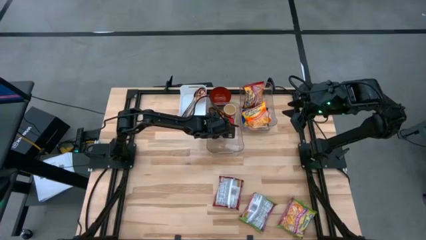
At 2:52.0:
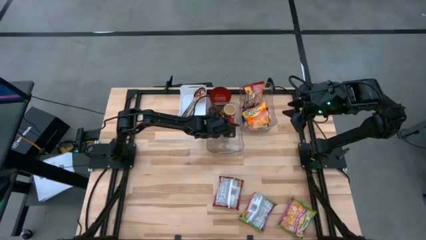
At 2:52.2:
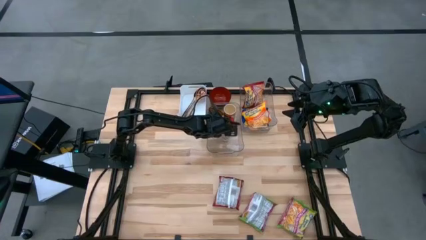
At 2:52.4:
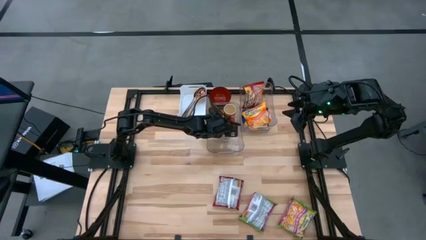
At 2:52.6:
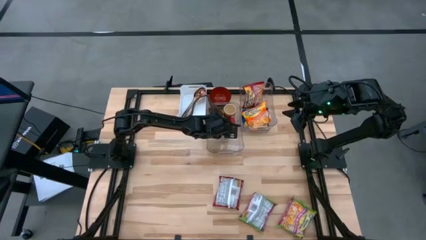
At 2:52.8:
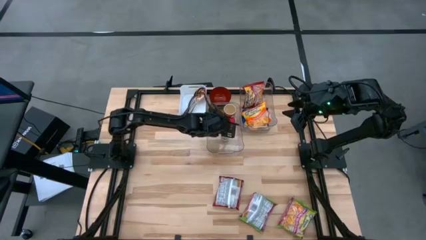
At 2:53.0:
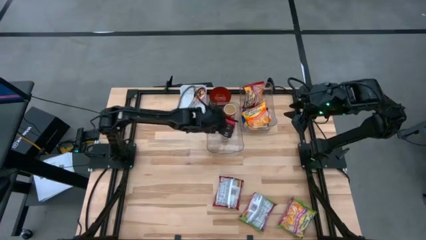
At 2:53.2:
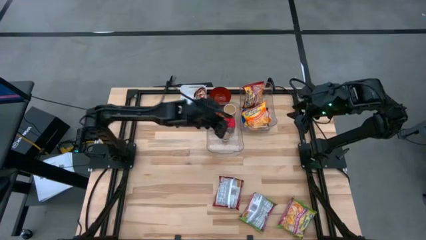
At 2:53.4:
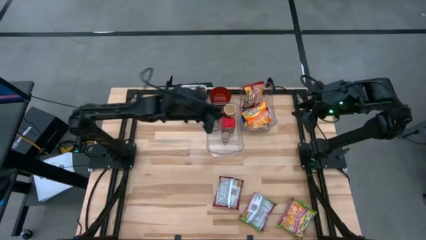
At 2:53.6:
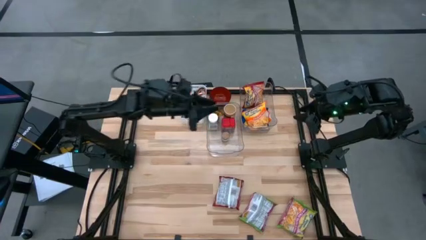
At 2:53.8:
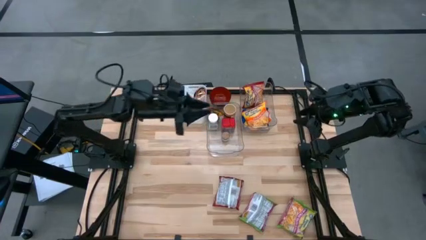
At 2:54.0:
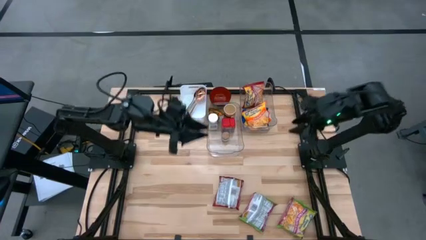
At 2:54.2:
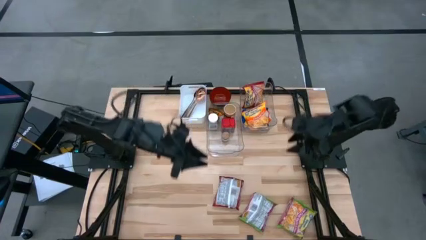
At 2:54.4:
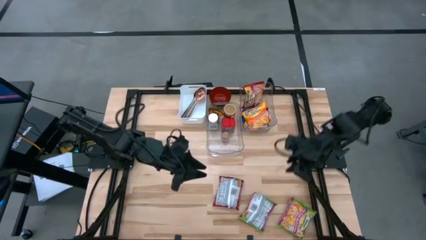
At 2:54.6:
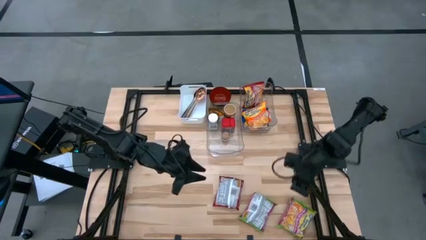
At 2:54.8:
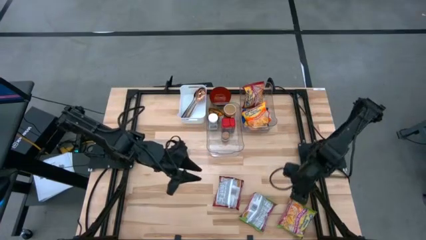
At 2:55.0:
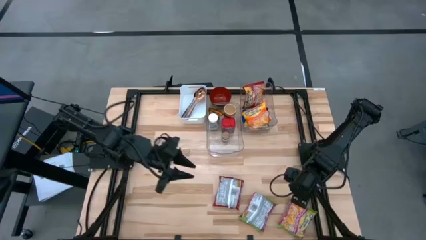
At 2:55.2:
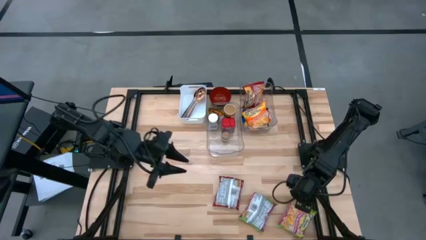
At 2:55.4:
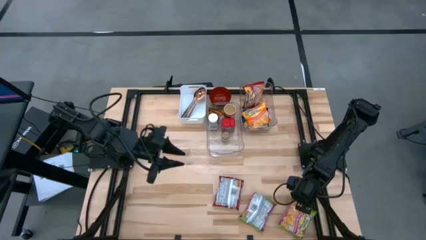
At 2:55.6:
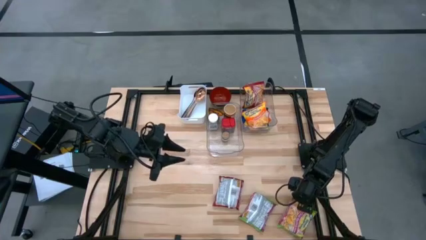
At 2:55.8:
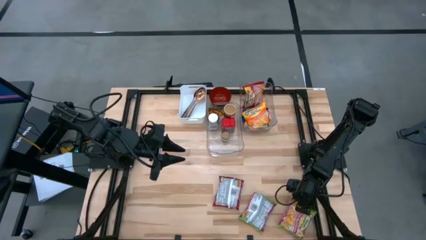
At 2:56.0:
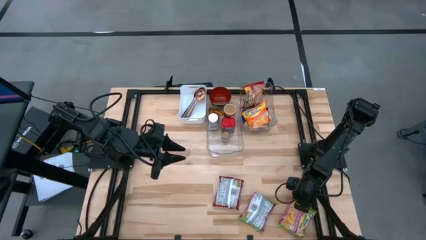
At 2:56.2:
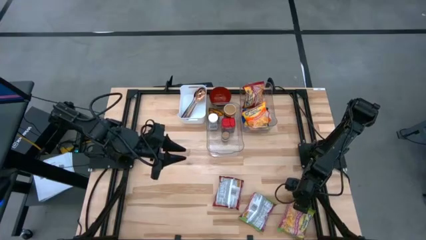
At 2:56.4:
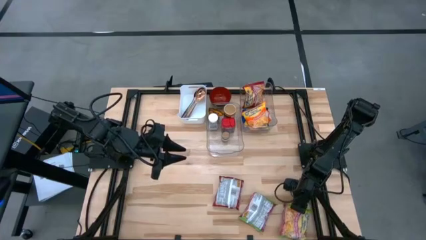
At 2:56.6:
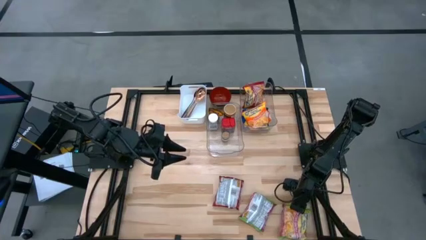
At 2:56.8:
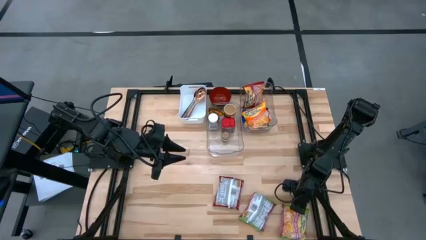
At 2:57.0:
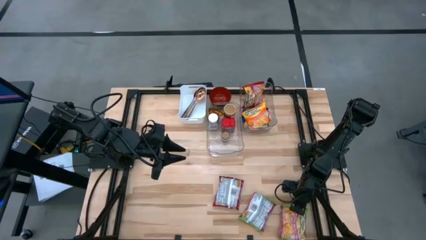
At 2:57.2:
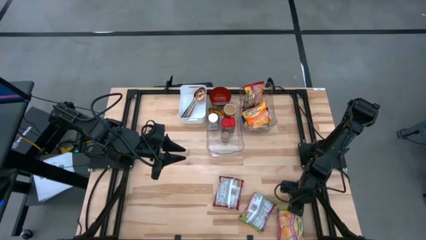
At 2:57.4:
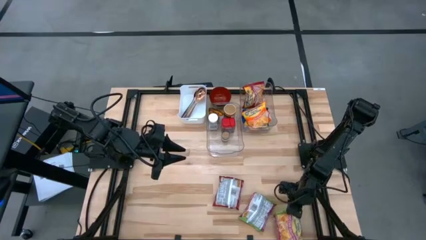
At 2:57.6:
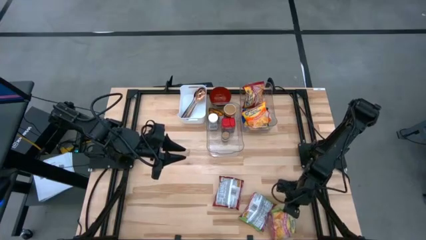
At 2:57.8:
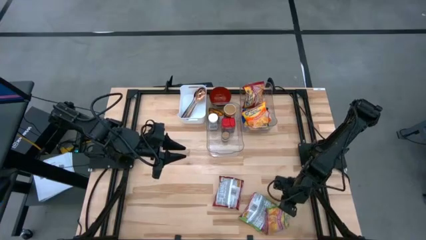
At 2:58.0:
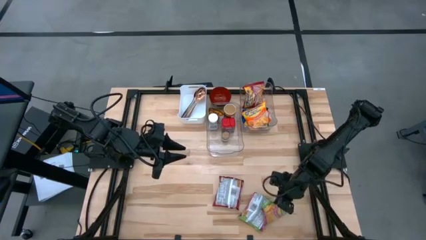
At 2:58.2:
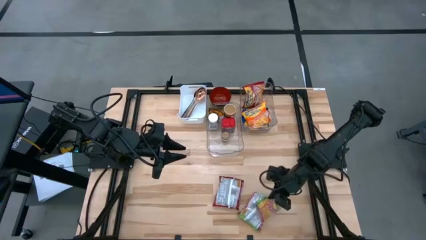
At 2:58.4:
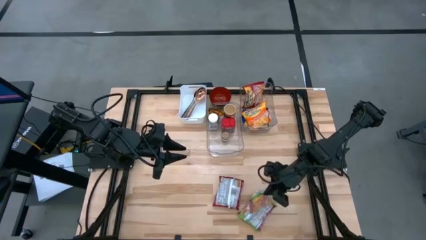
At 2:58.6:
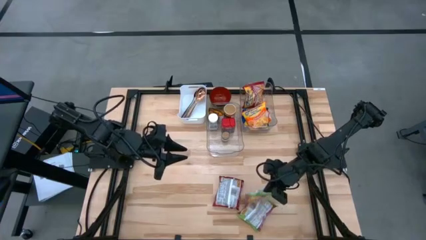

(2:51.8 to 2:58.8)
Task: Pick & Place Food Item
Put the right green noodle pack into the right transparent bin

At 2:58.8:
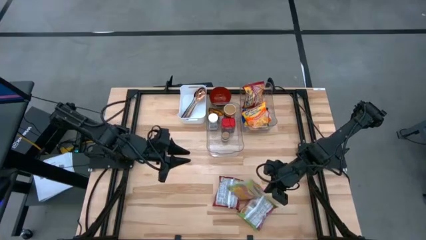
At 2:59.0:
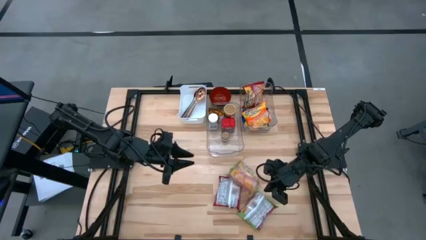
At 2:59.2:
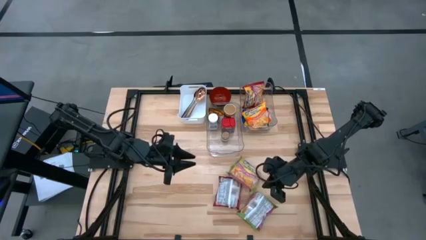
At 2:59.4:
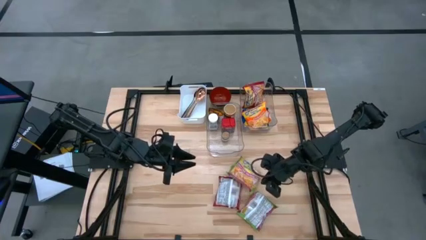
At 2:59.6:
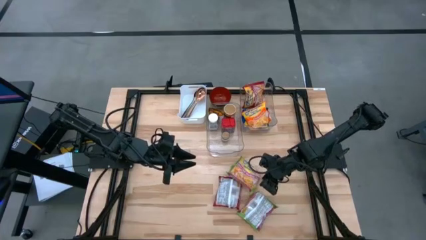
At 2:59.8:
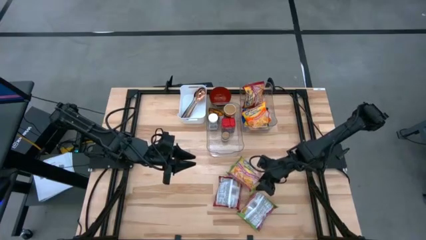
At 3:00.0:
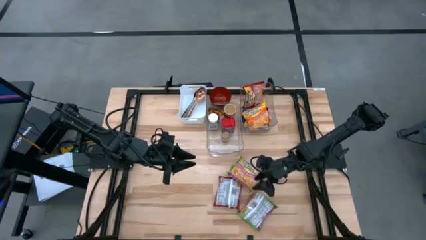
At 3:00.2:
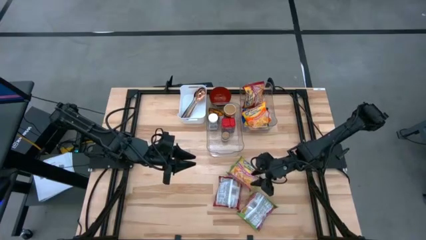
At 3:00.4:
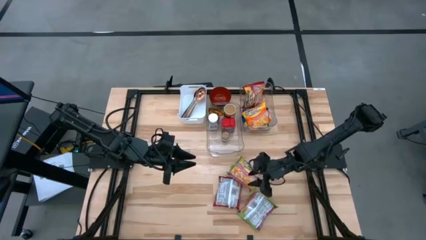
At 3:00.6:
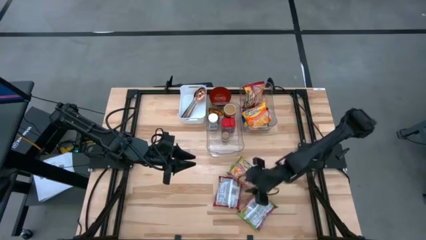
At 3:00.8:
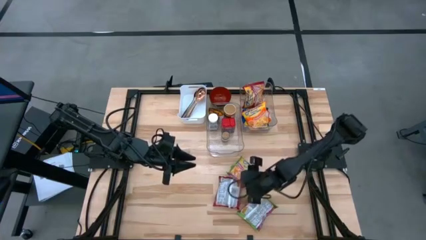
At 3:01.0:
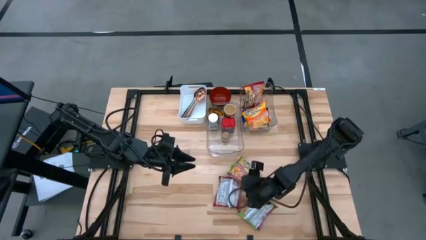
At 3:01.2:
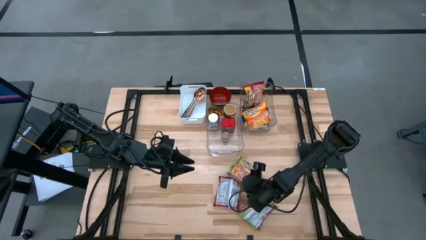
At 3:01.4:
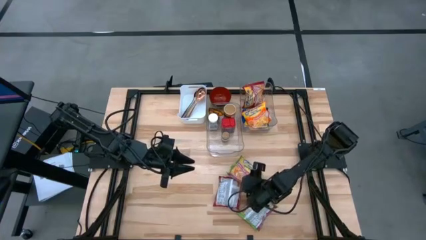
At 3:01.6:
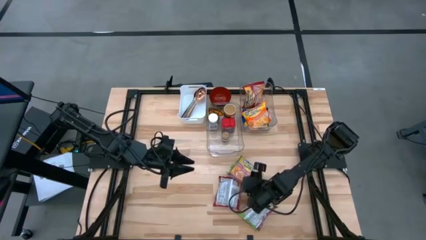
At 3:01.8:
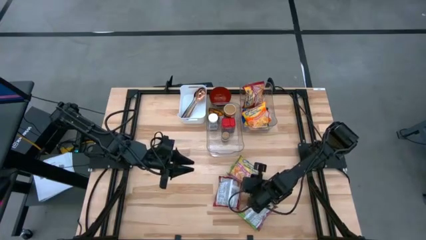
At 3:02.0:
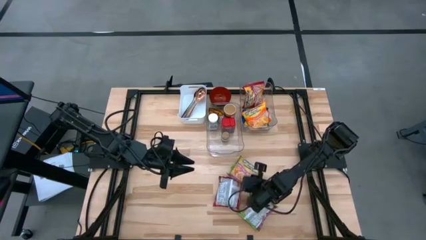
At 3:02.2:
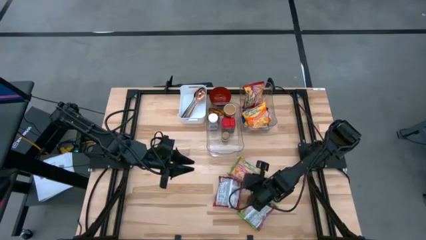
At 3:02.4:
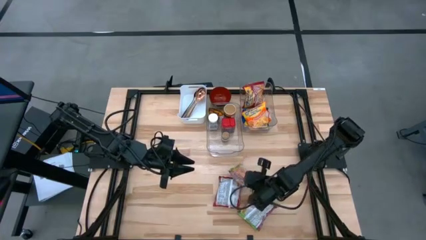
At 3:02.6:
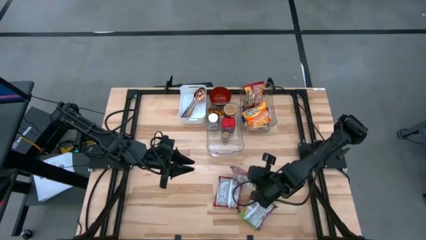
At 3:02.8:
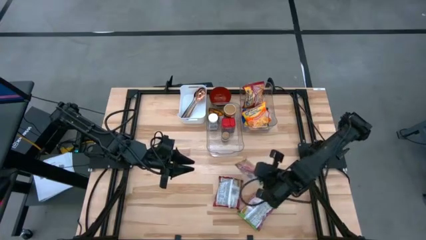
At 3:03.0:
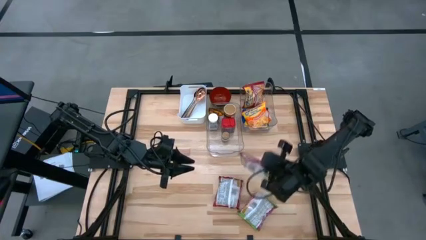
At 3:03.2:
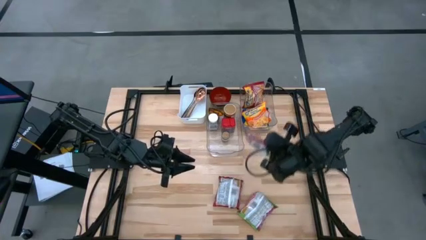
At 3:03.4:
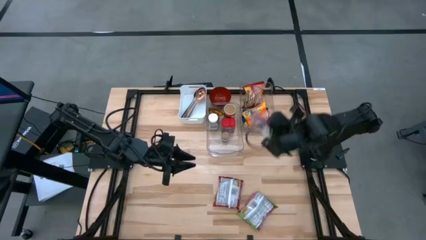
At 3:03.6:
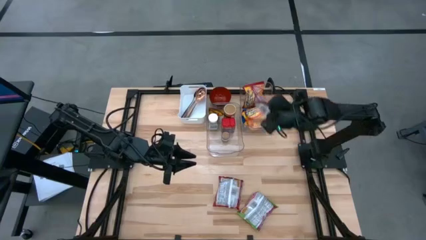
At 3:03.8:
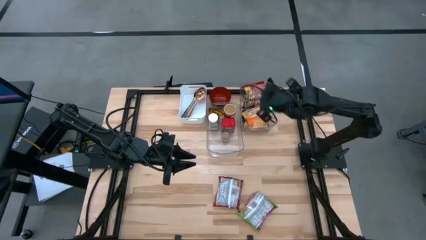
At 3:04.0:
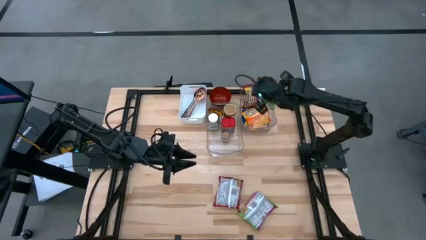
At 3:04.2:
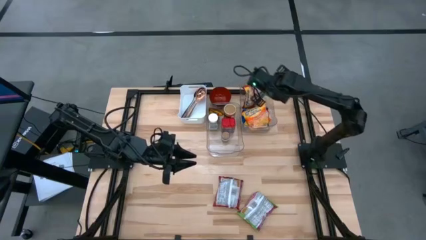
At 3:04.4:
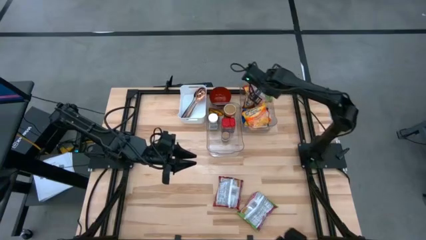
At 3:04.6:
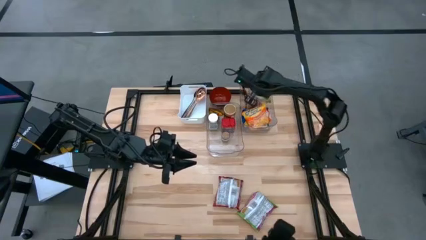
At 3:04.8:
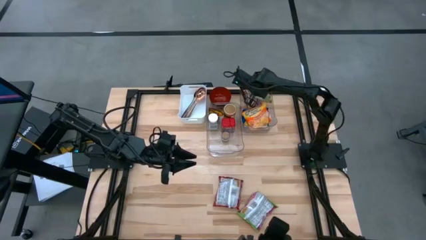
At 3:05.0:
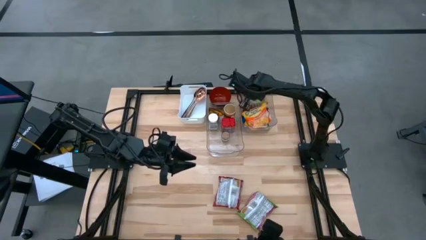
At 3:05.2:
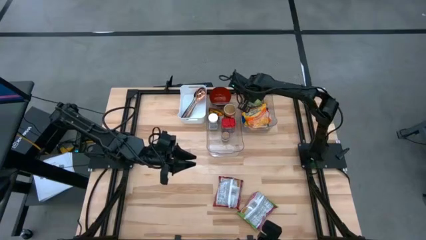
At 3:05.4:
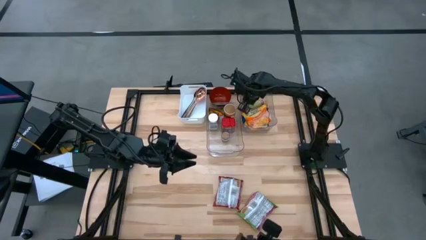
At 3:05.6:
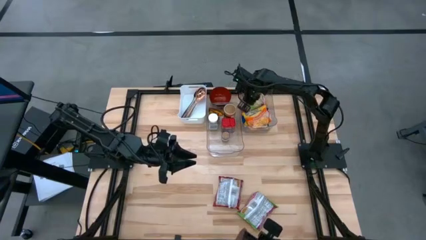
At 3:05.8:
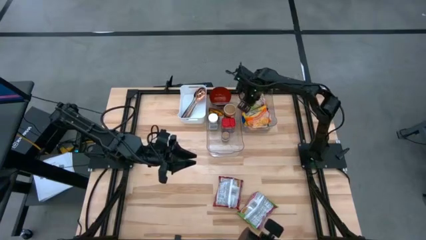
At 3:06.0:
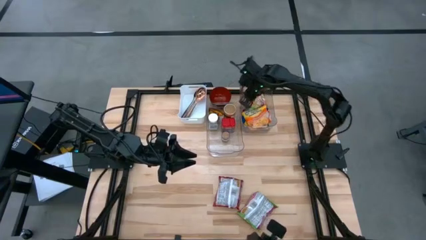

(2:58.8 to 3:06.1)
Put the top green noodle pack into the right transparent bin
